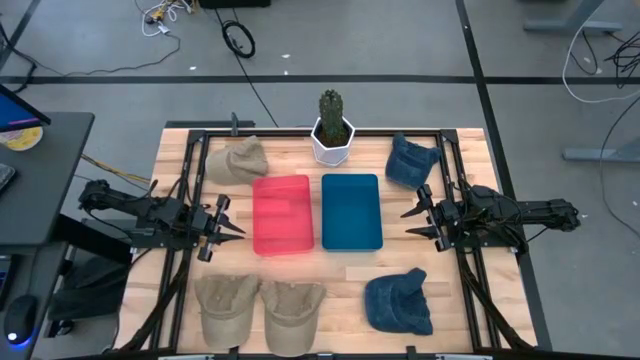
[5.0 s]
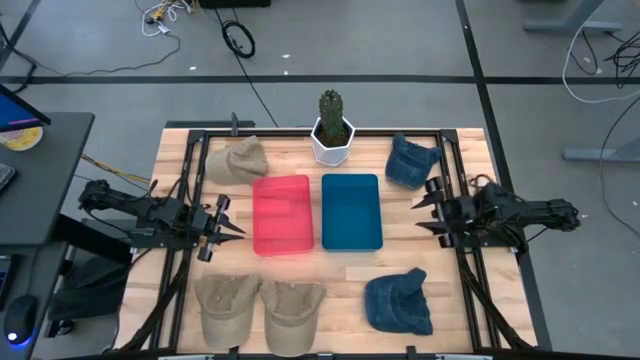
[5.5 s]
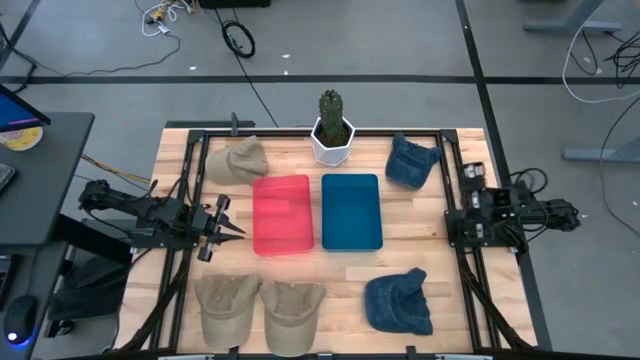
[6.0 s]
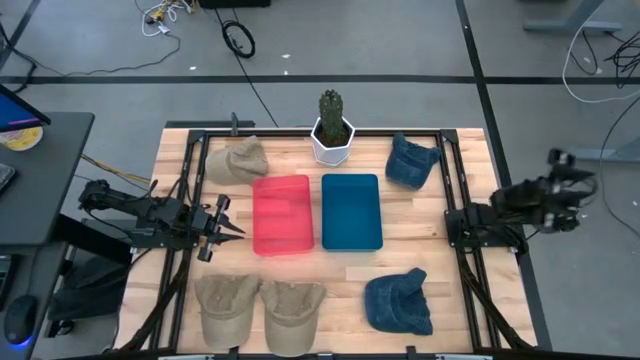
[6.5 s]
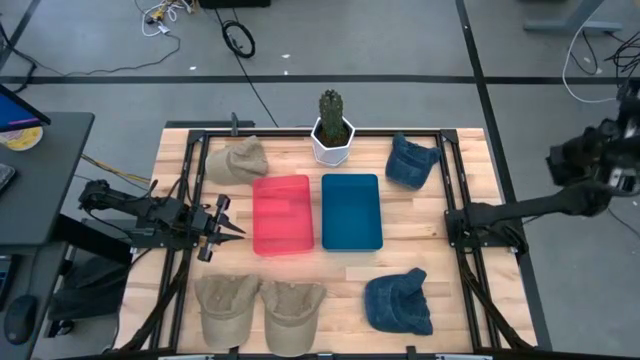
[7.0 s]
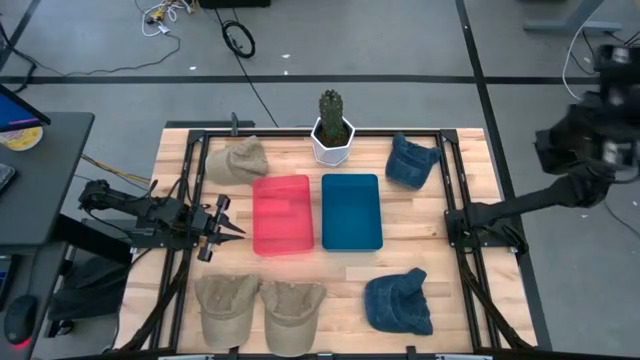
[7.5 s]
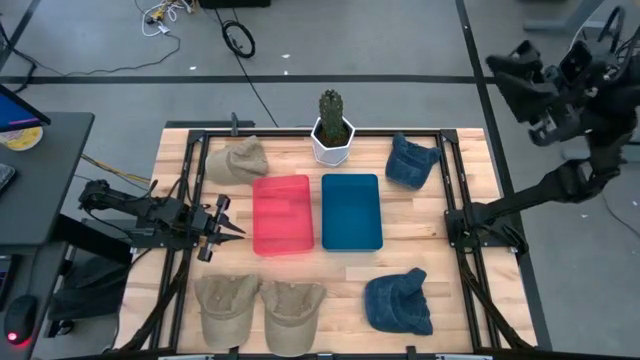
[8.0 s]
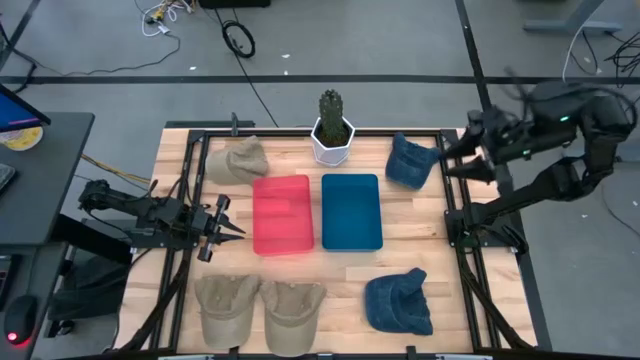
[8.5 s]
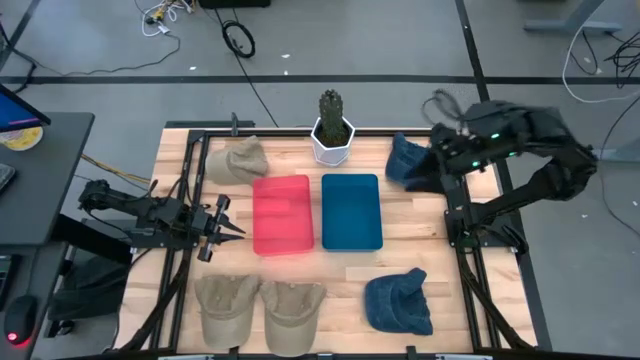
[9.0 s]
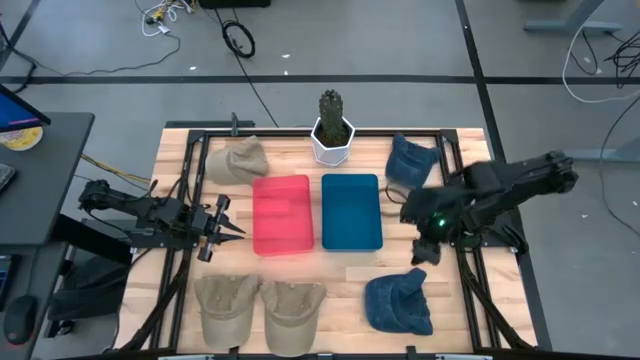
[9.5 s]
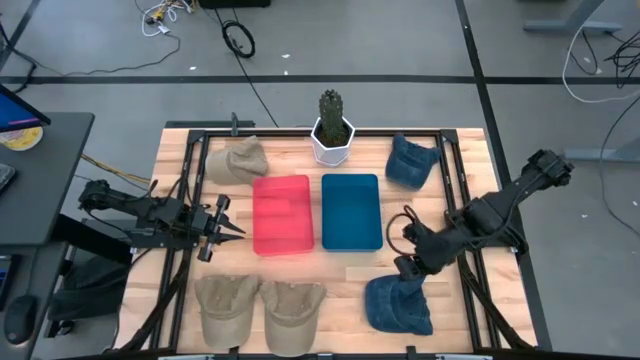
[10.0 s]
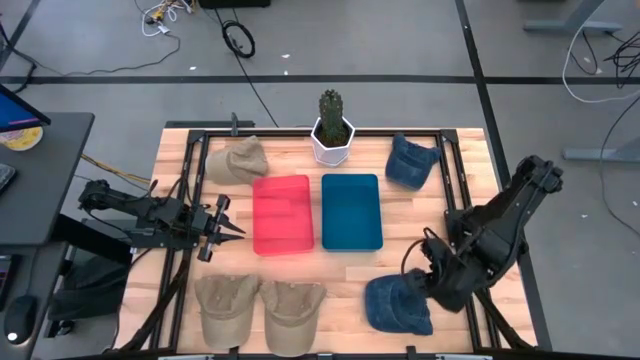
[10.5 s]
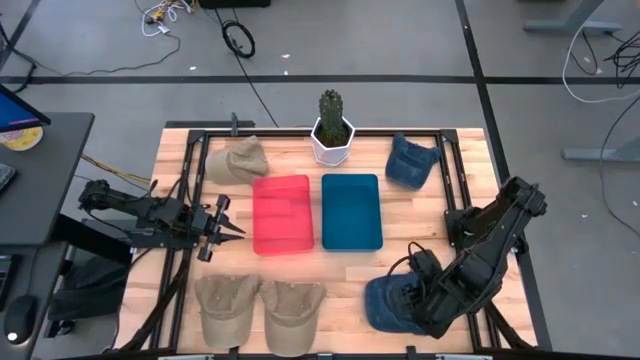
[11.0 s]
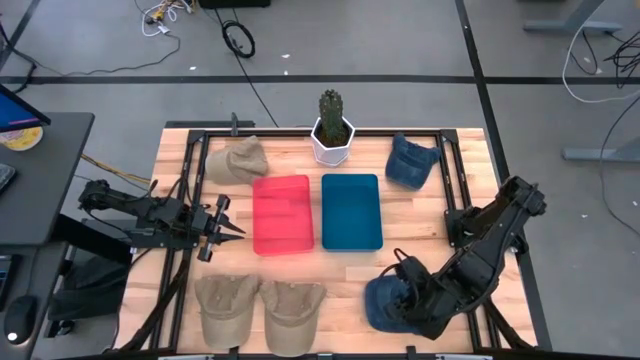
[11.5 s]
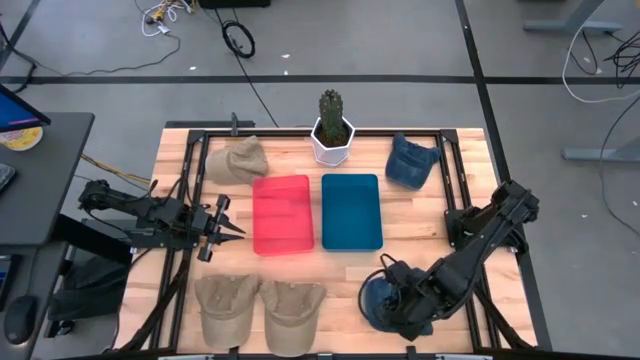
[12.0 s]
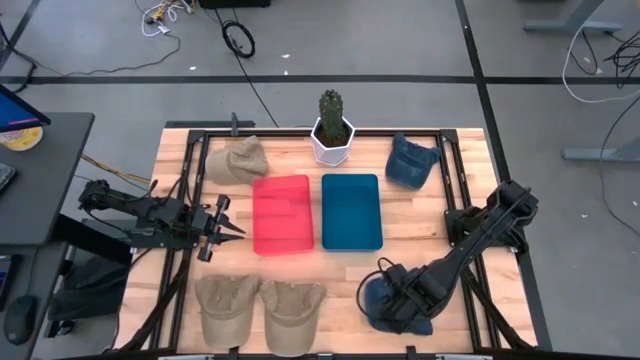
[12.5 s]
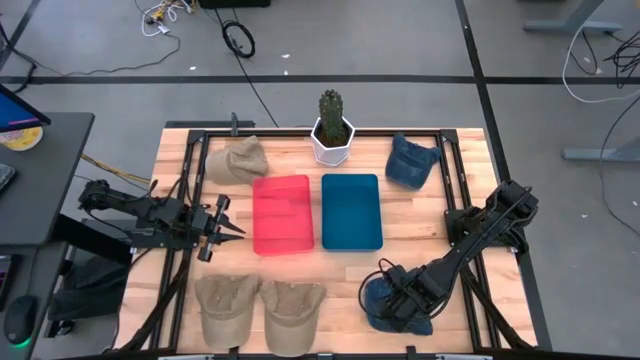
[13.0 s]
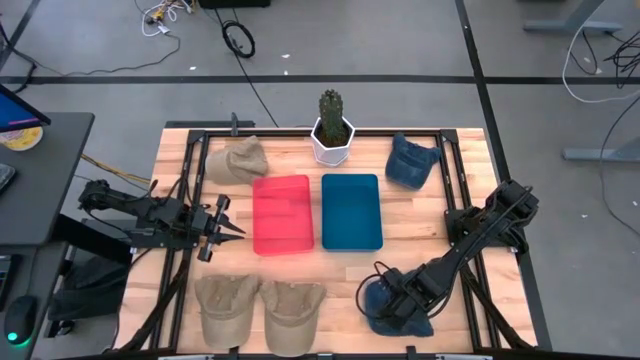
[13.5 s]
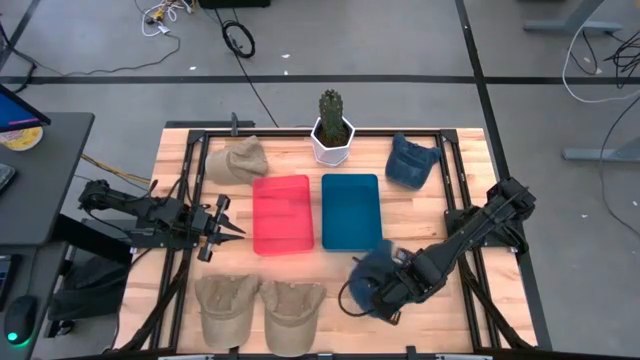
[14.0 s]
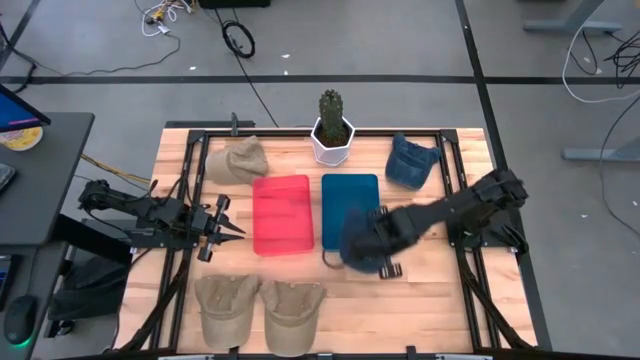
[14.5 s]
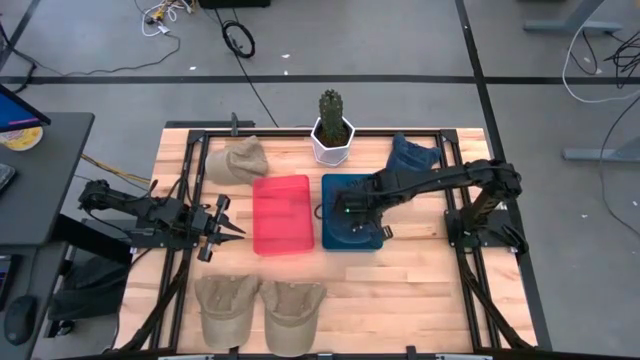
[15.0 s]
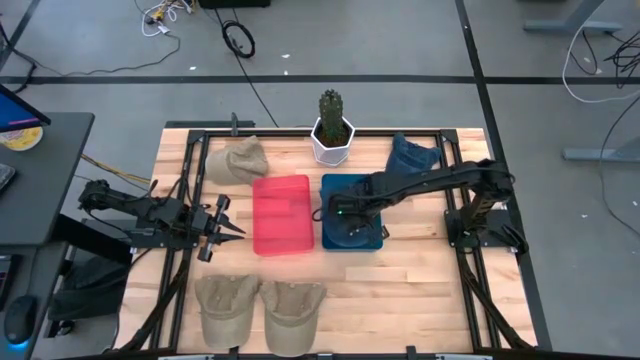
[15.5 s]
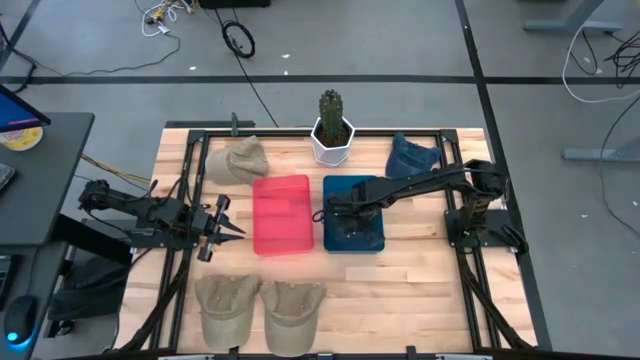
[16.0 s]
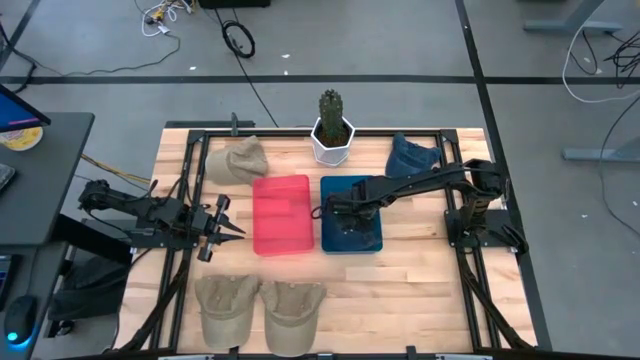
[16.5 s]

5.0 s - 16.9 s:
Task: Pick & Place hat
Put the bottom gray cap into the blue bin

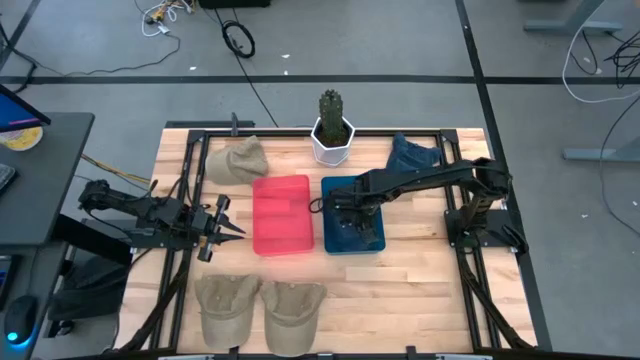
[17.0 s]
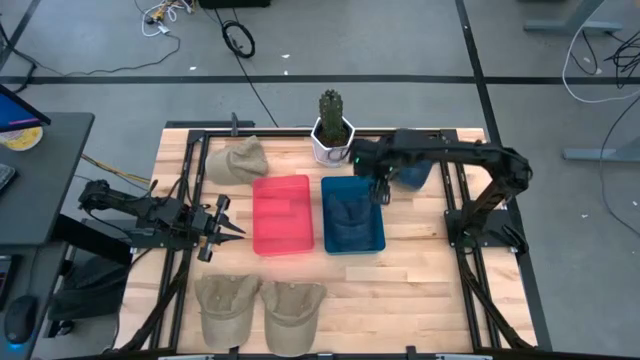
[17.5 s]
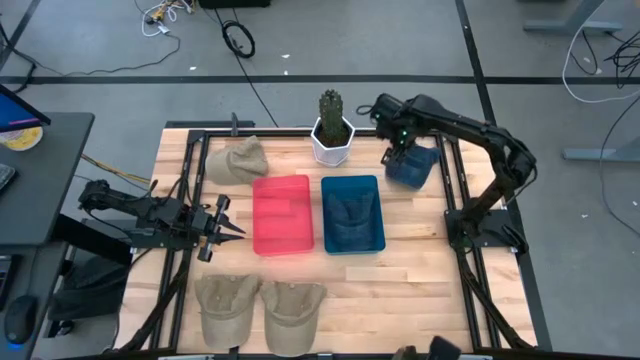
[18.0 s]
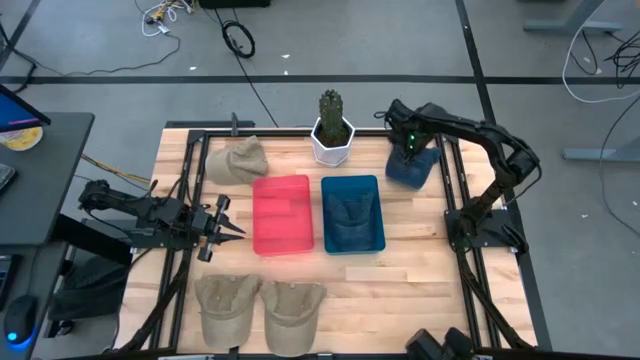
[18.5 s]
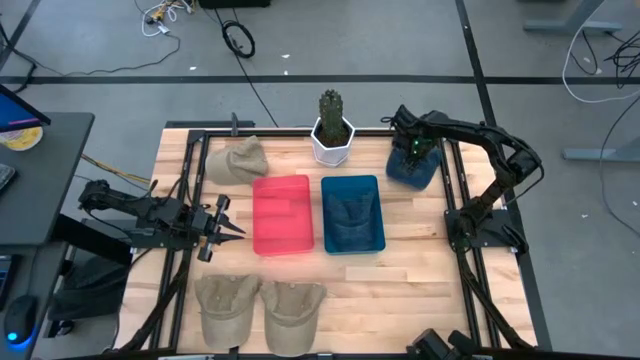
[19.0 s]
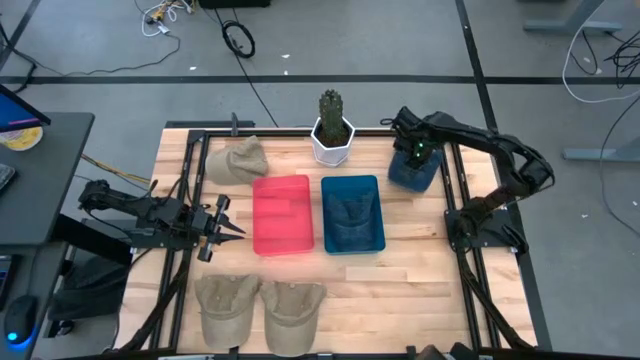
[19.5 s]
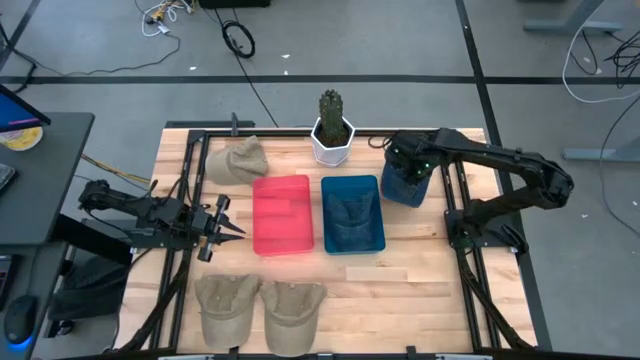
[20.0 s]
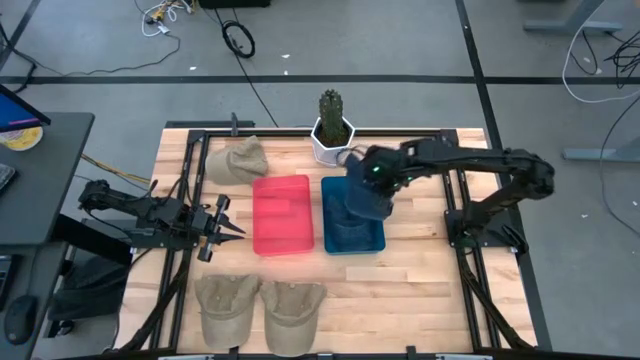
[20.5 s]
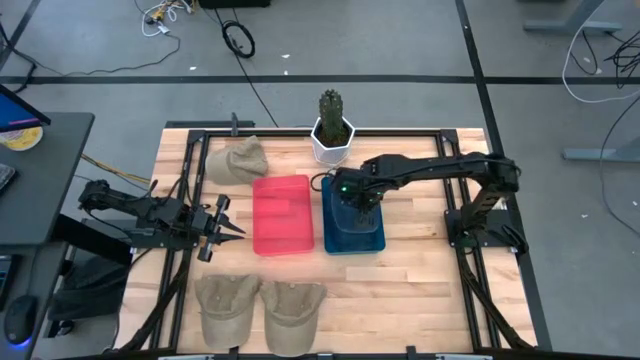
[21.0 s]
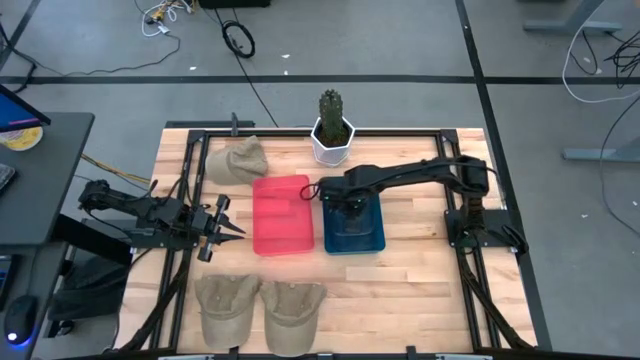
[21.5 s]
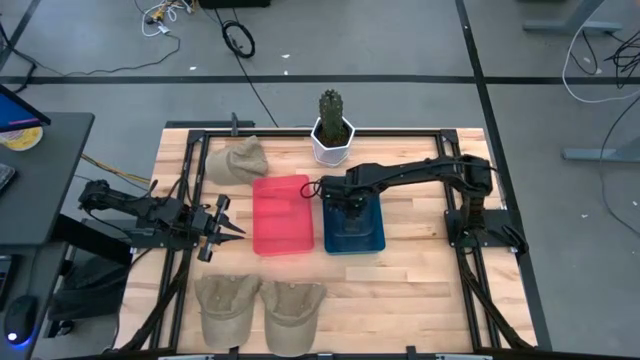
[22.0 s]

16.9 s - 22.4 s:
Put the gray cap into the blue bin

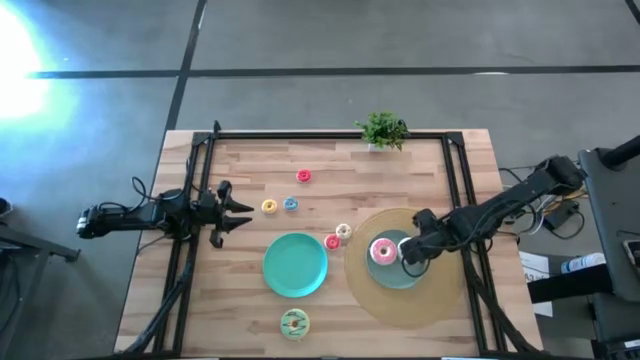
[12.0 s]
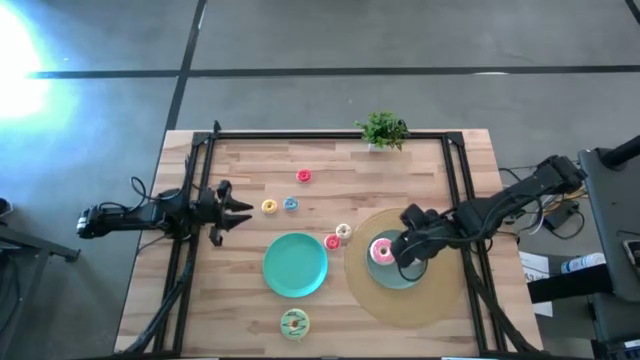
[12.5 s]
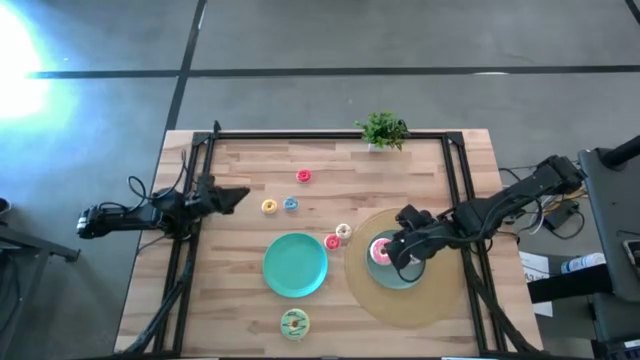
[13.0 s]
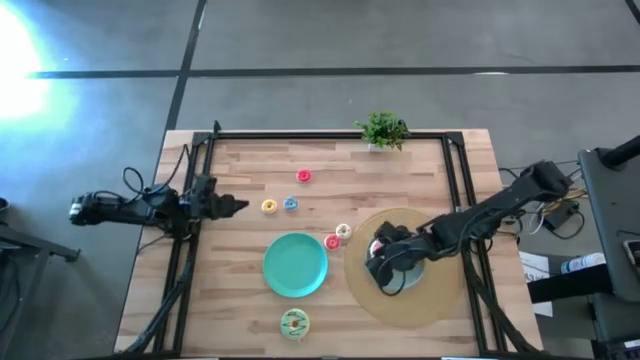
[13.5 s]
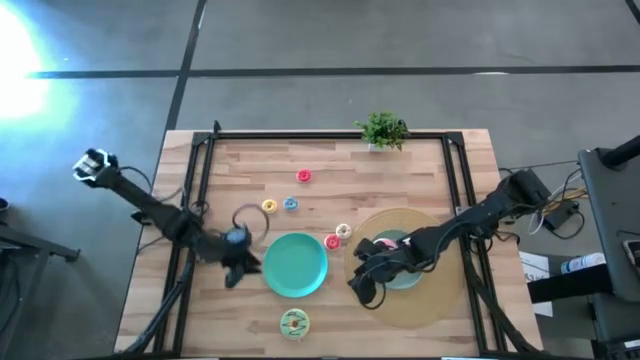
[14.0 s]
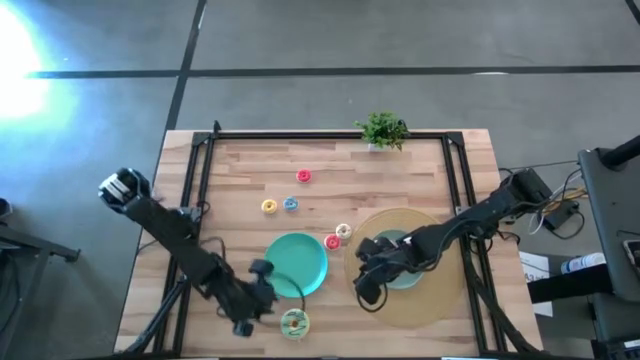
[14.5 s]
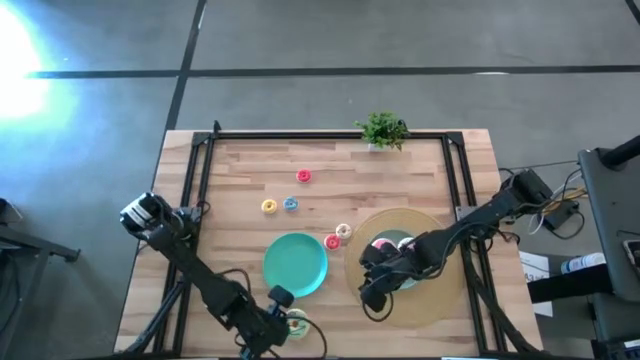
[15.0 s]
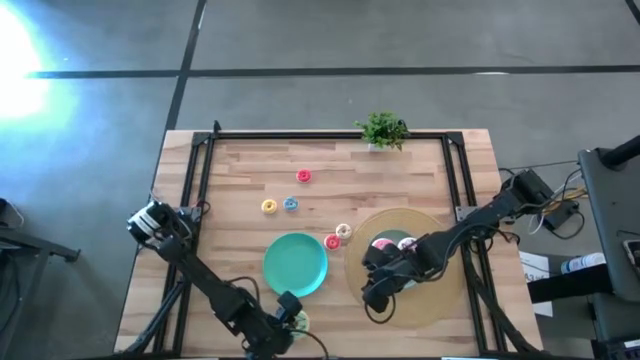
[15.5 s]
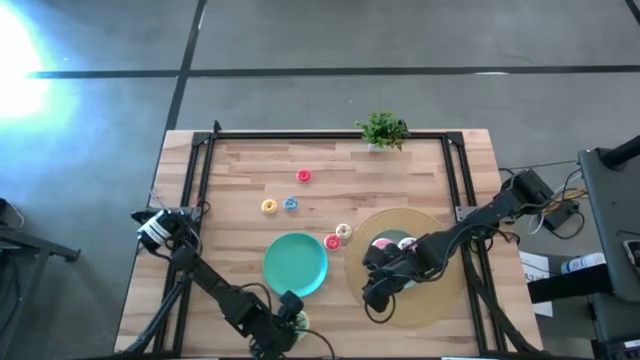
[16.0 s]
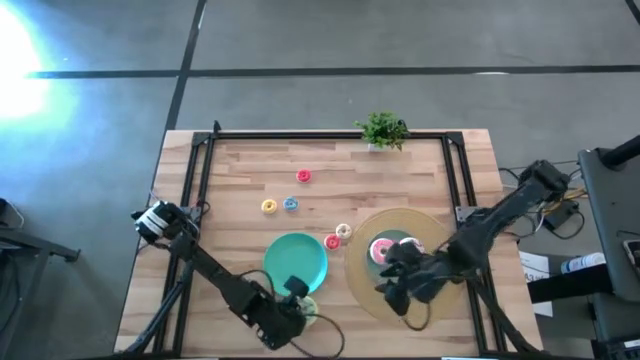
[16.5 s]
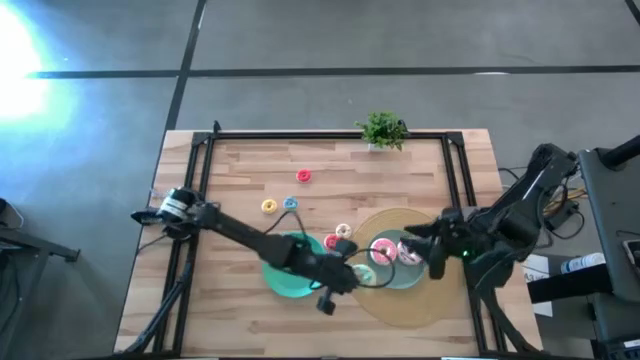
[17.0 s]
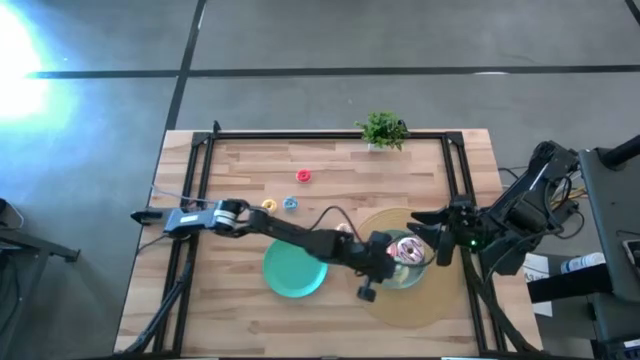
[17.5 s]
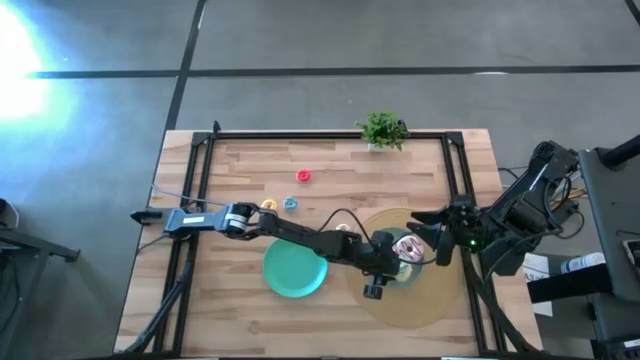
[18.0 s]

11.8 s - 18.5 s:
Task: Pick & Place donuts
Put the large light blue donut on the light blue plate
